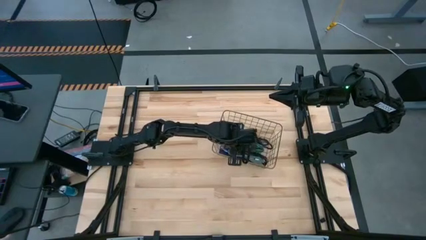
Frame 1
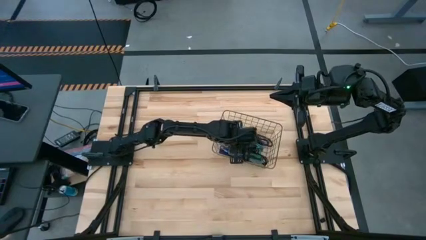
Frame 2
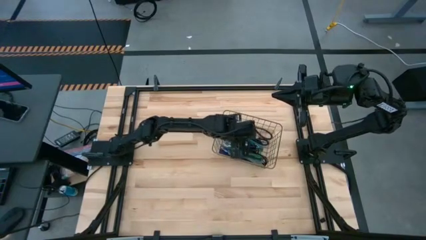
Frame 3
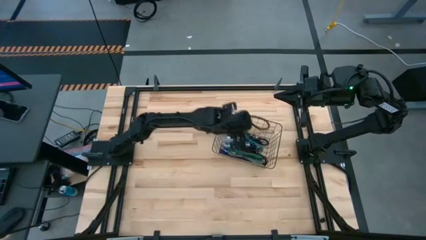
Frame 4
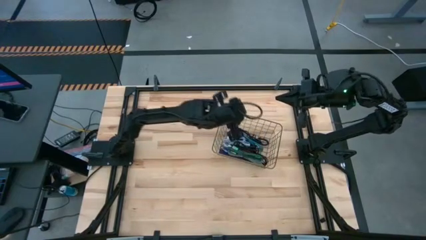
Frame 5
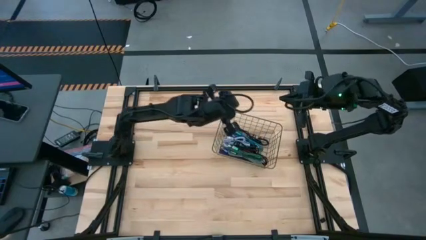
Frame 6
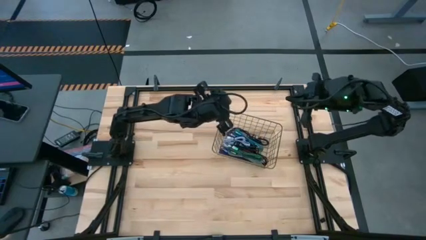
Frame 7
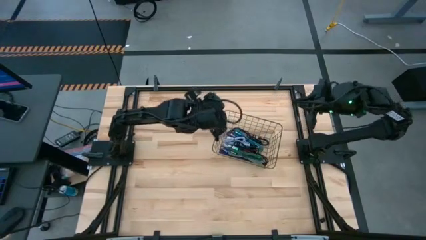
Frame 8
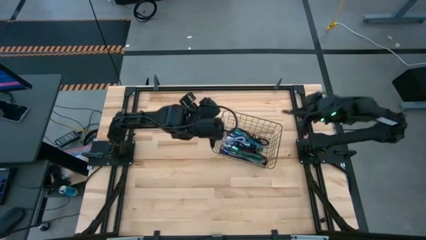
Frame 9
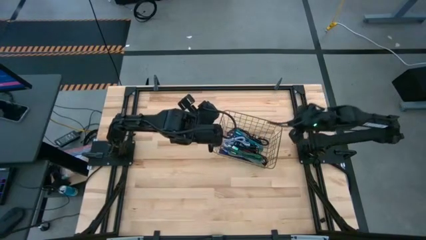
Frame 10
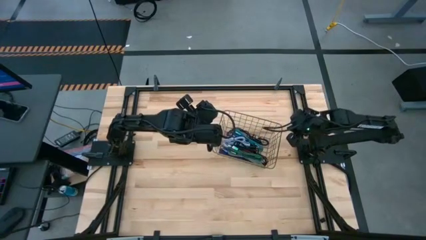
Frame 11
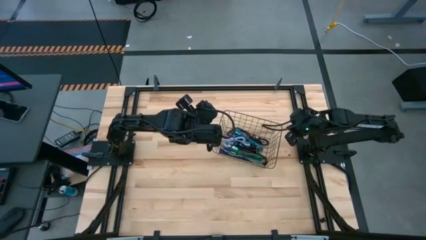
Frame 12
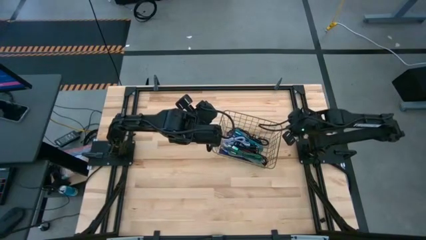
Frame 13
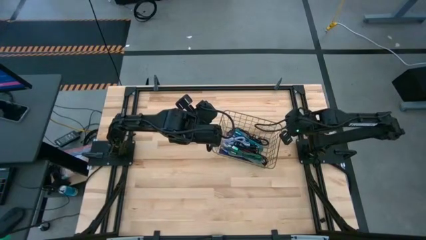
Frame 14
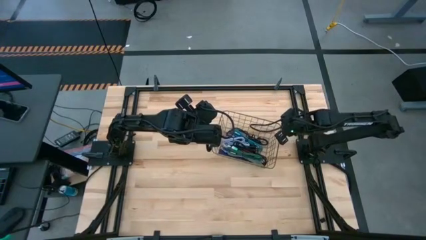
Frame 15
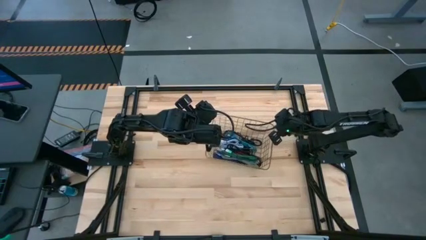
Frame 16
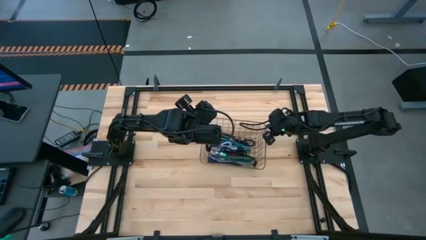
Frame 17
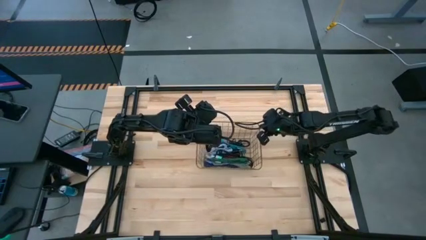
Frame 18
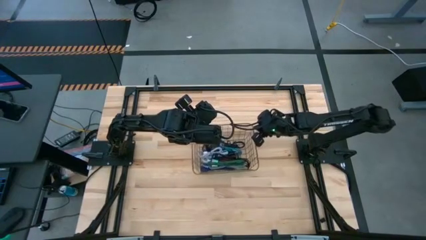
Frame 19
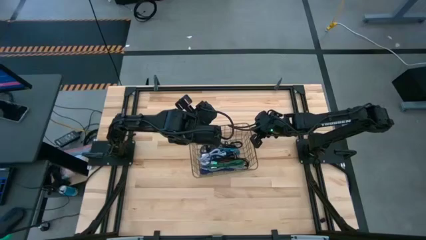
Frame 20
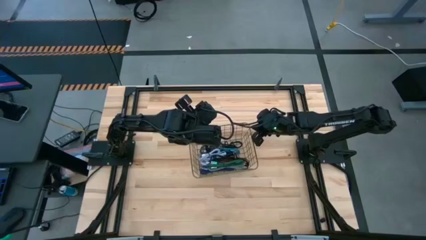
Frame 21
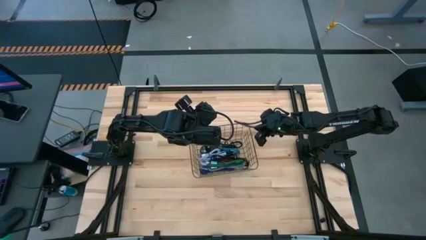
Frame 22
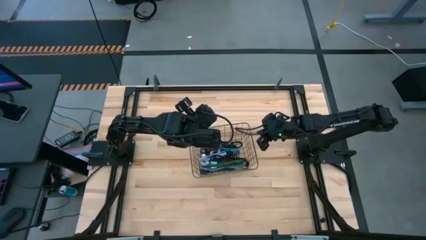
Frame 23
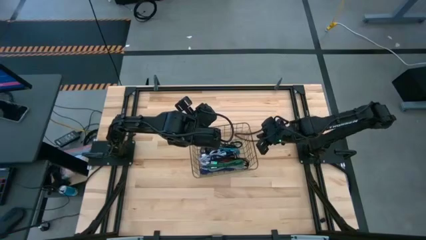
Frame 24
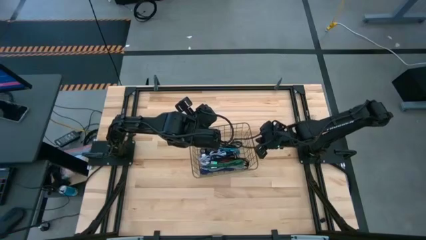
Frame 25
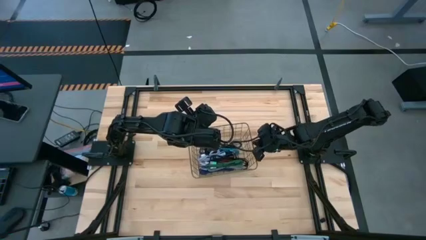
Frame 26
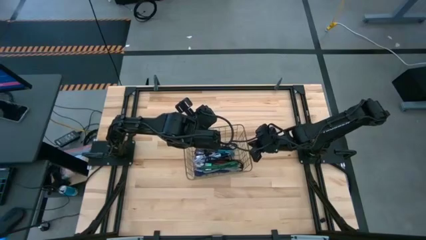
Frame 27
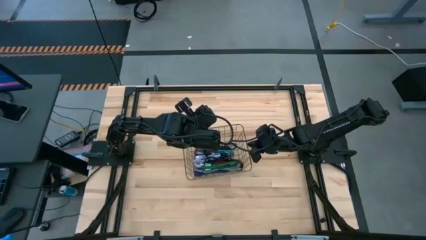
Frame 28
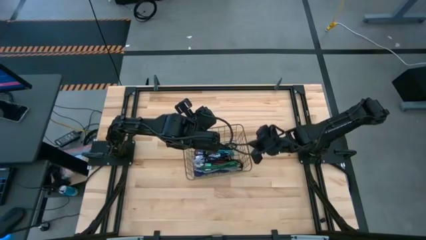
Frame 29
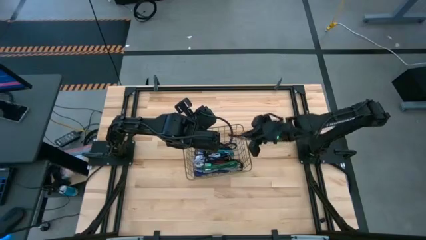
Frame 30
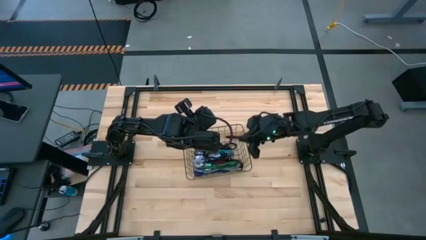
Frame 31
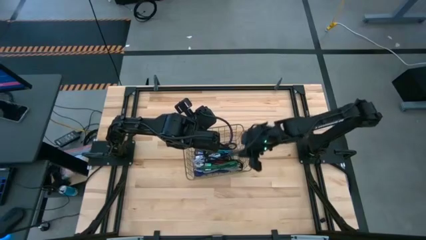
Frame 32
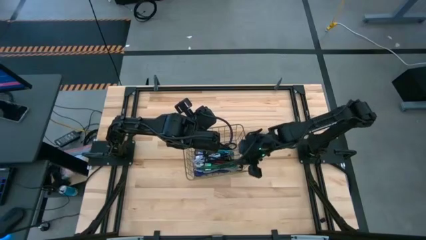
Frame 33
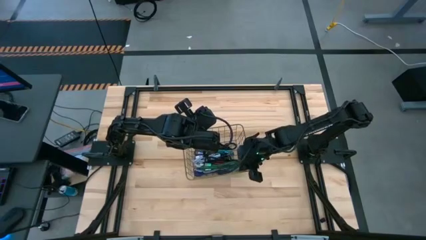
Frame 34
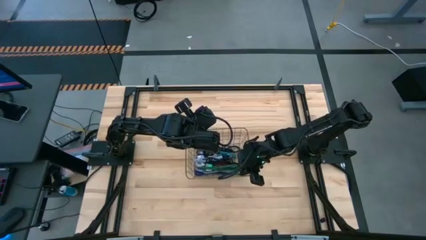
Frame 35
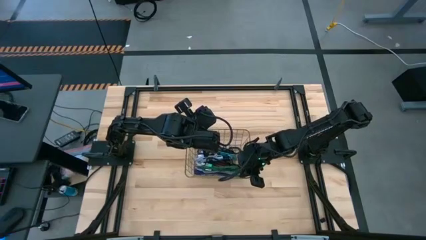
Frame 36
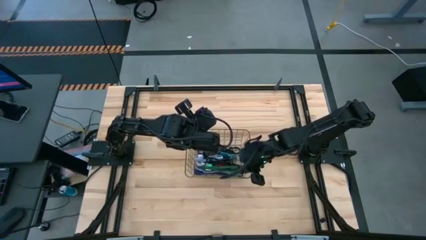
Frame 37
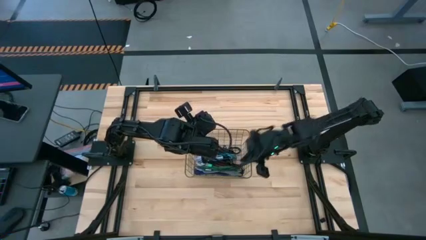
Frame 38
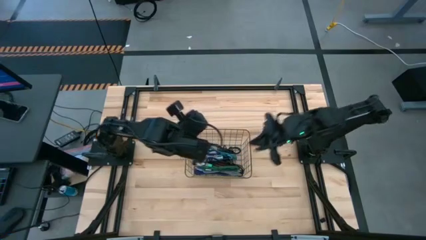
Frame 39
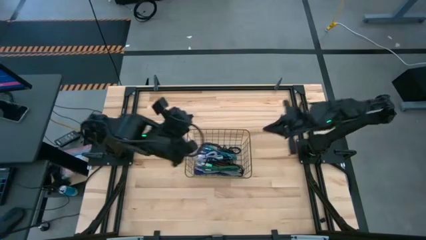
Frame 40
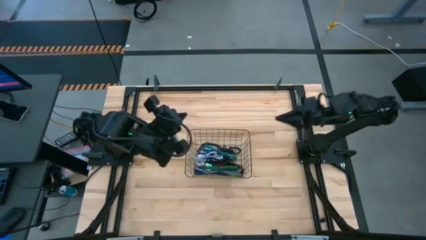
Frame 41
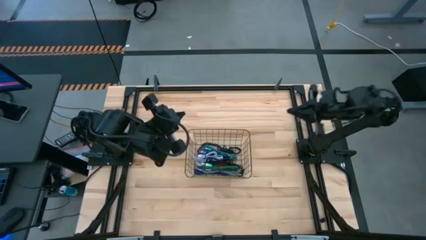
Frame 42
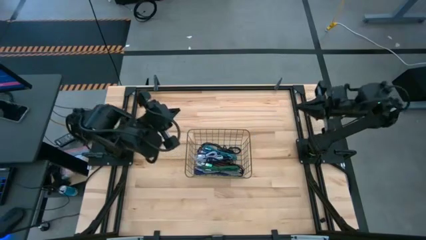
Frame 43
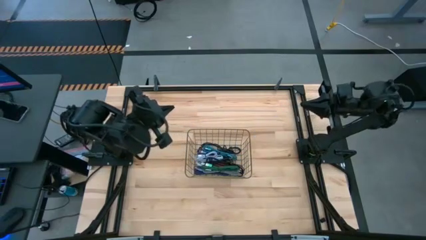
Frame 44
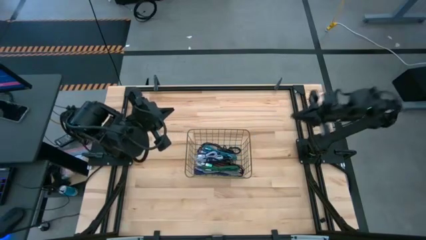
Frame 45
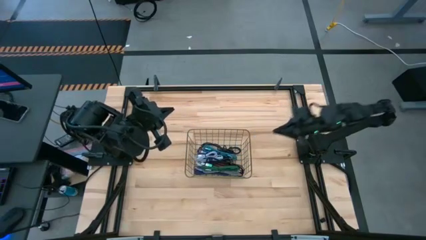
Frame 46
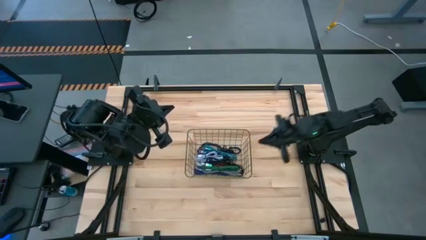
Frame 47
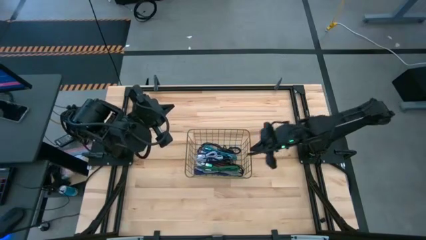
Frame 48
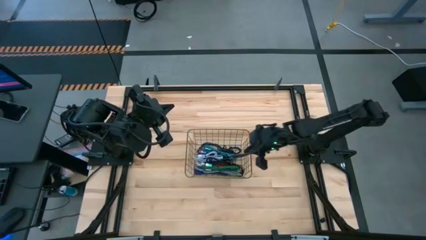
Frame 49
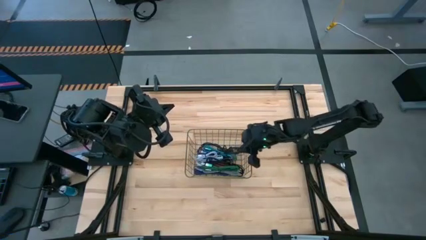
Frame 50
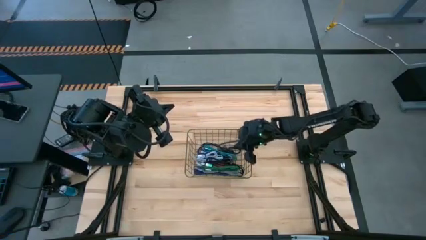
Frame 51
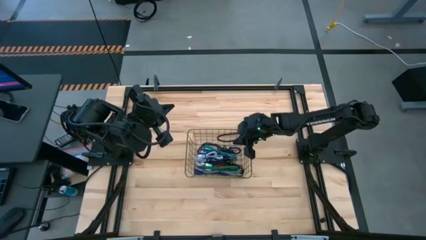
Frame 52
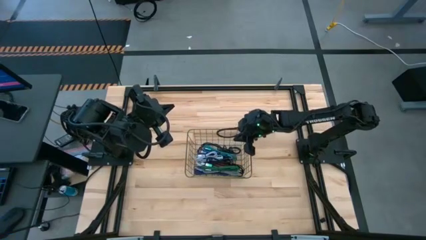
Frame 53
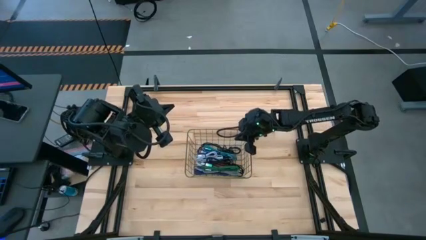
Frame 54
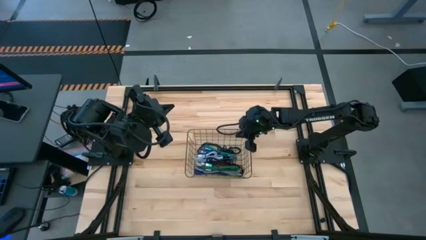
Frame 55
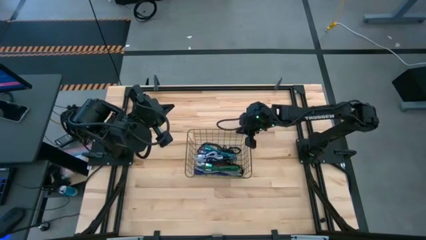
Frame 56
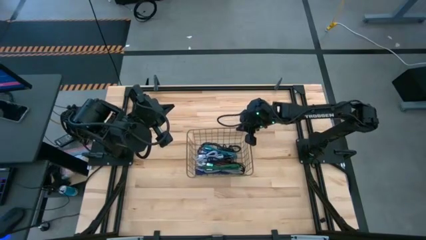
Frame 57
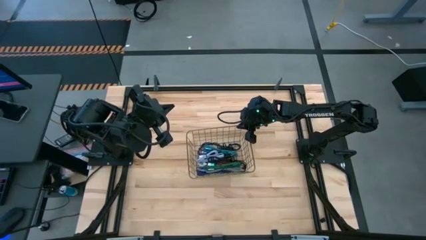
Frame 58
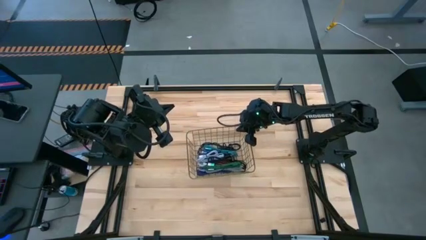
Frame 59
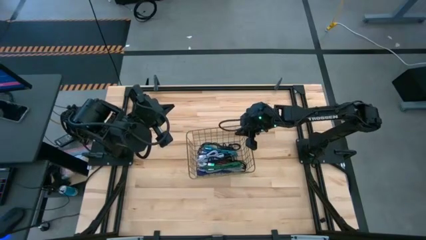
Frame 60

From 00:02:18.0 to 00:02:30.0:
Task: Pick and place USB-C Cables
Adjust the wire basket

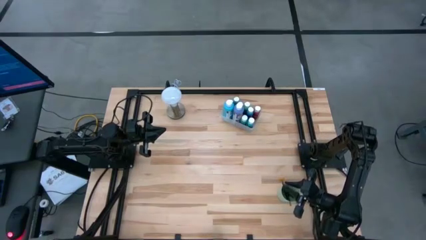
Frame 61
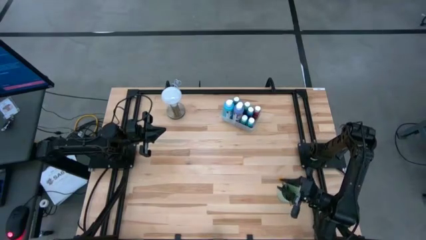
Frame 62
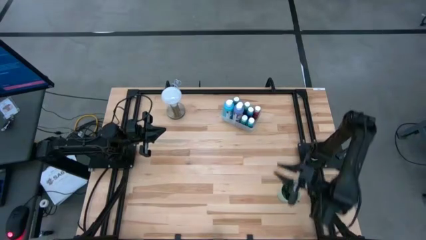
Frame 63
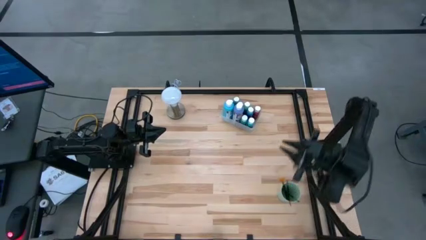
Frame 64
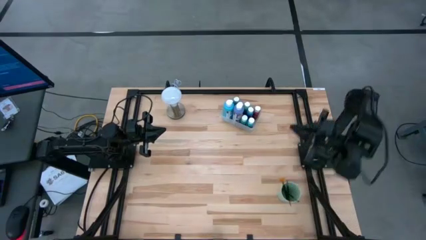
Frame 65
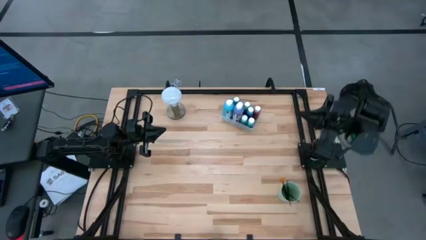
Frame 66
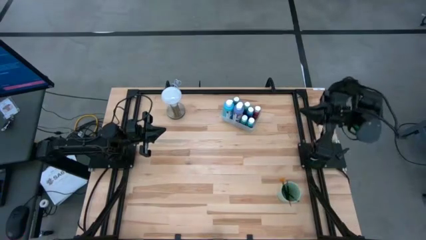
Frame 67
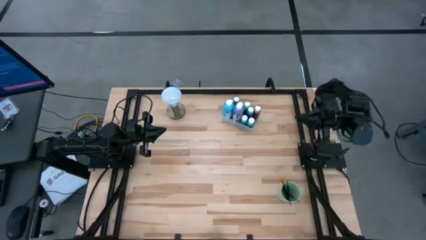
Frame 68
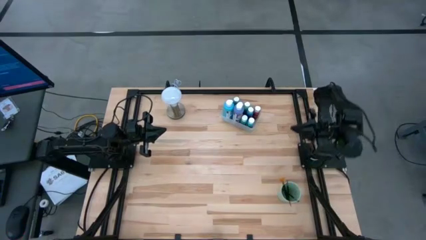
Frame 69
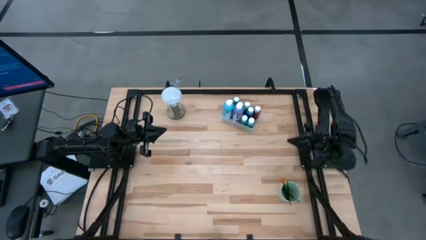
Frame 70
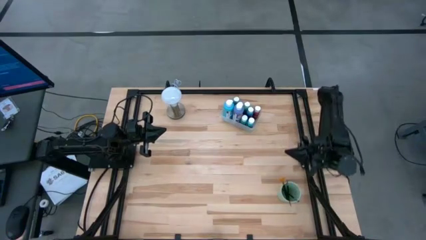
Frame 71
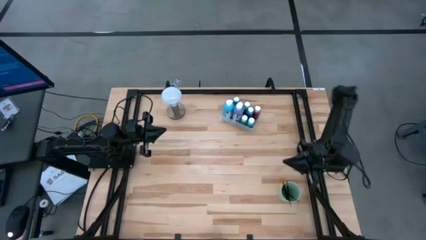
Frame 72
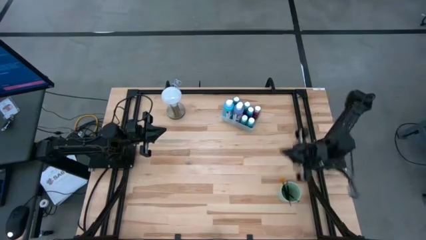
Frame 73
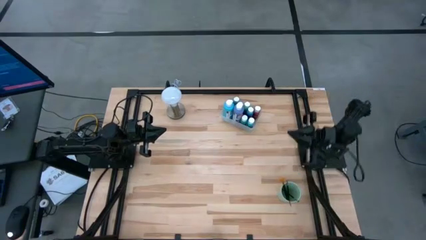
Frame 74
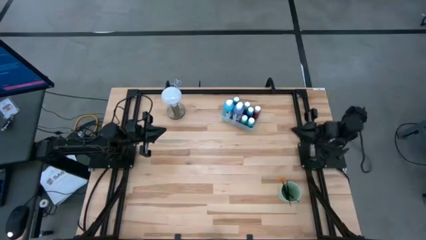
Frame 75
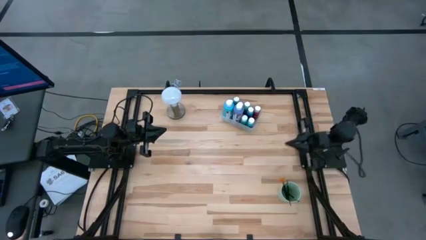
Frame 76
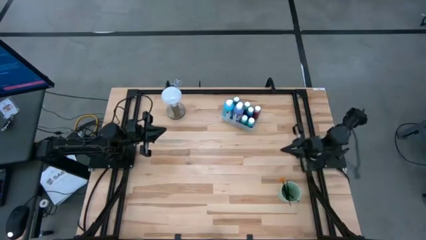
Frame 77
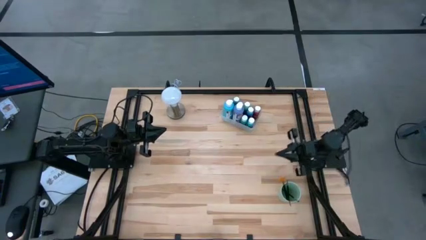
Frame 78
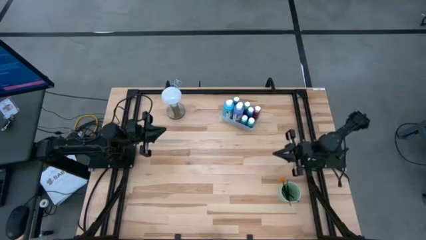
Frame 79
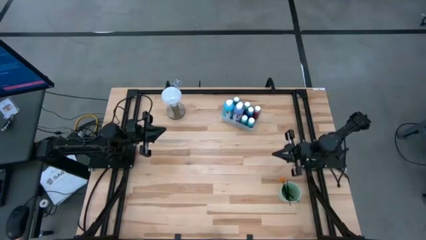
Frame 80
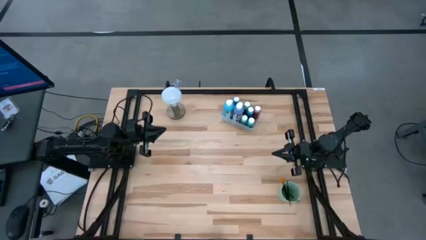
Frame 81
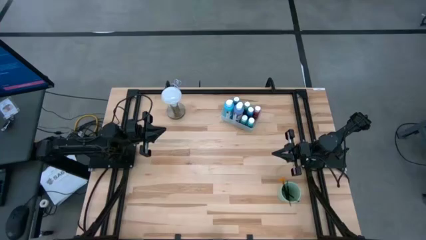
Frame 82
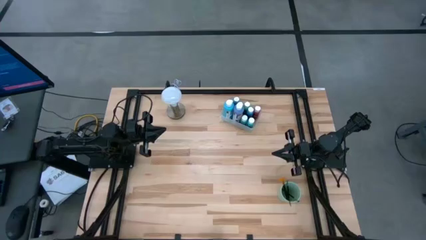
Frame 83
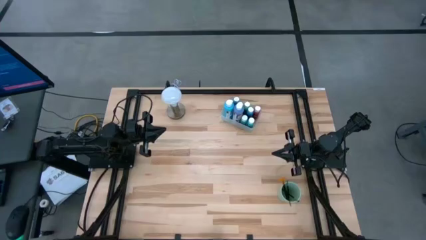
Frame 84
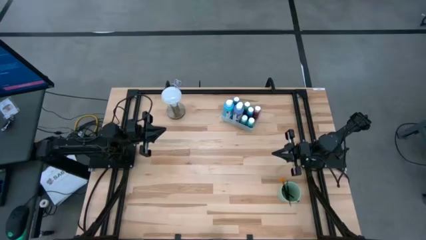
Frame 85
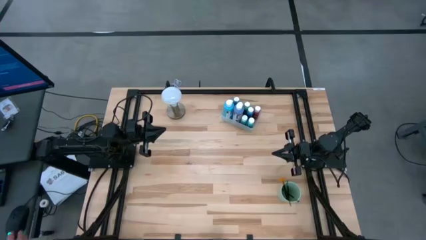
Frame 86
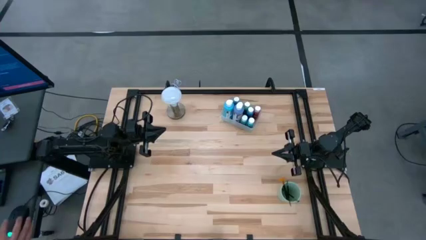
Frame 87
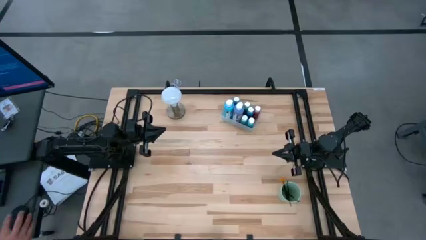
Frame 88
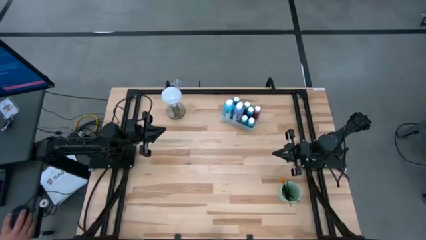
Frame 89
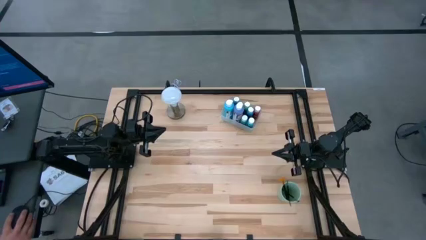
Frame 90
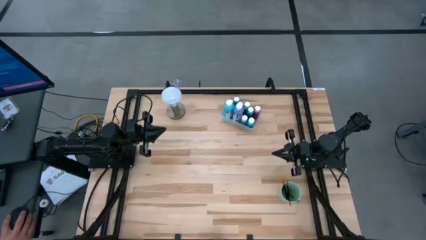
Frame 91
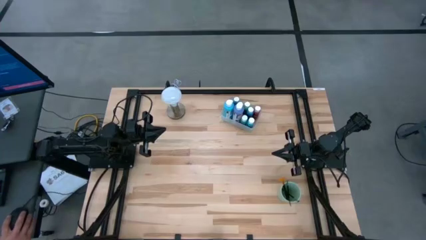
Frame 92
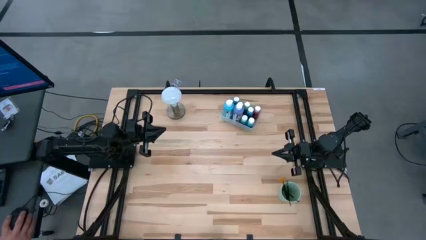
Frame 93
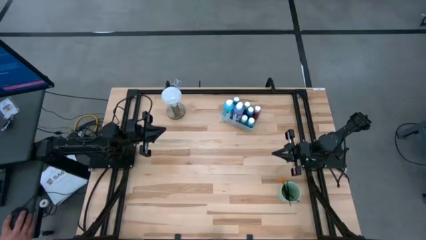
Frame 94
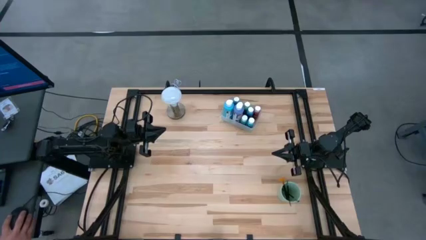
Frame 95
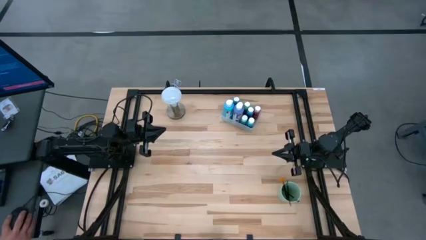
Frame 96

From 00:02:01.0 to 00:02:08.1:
Task: Pick & Place Paint Supplies
Return to Home Position
